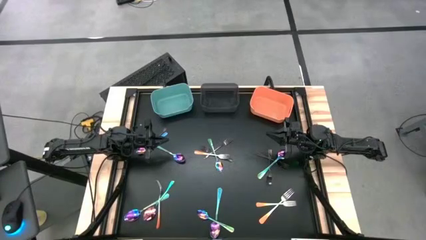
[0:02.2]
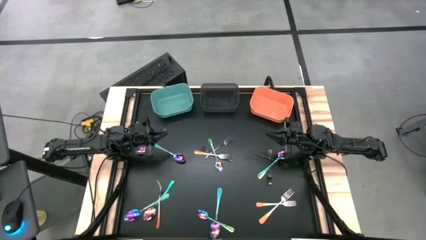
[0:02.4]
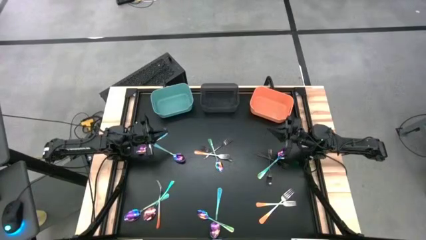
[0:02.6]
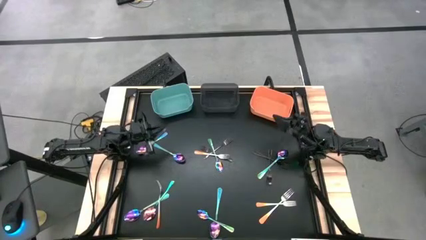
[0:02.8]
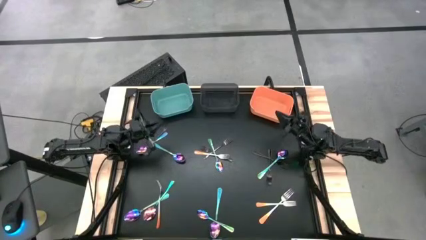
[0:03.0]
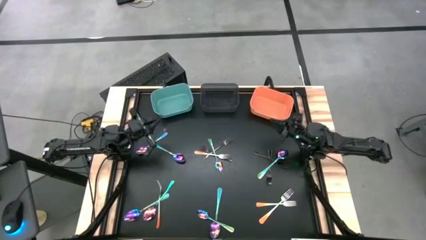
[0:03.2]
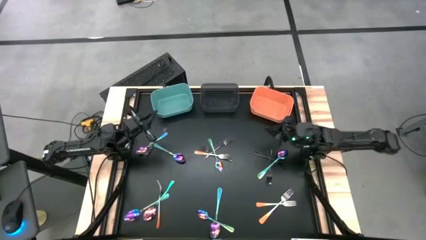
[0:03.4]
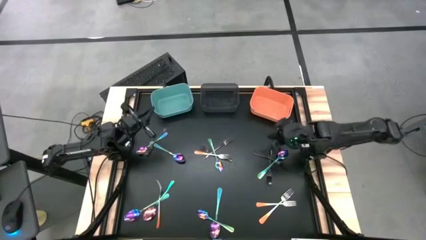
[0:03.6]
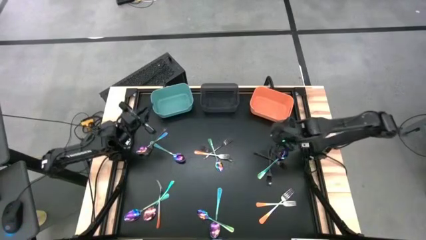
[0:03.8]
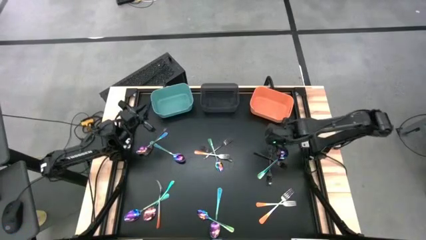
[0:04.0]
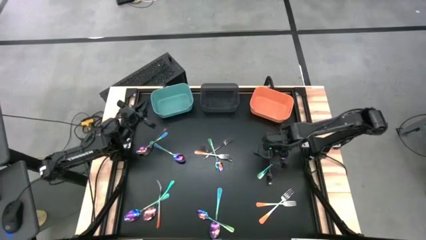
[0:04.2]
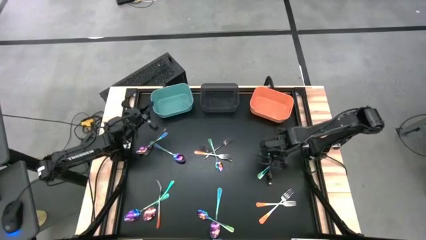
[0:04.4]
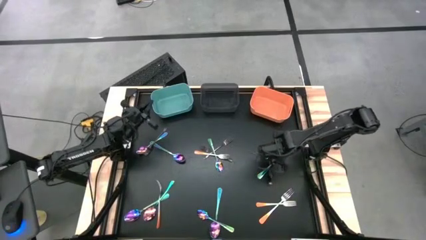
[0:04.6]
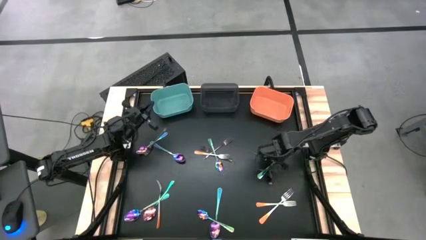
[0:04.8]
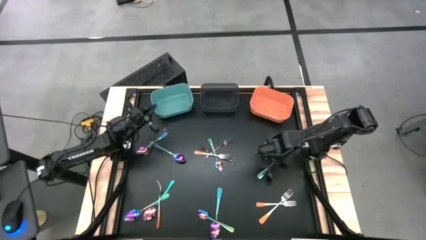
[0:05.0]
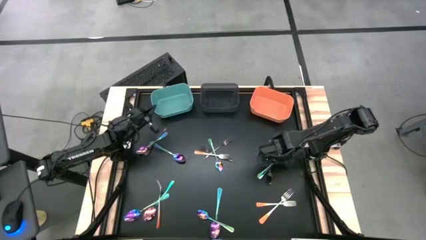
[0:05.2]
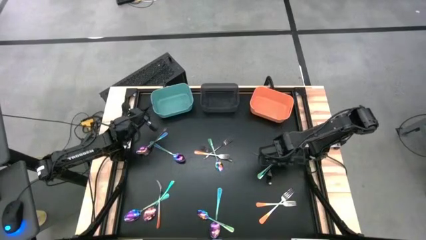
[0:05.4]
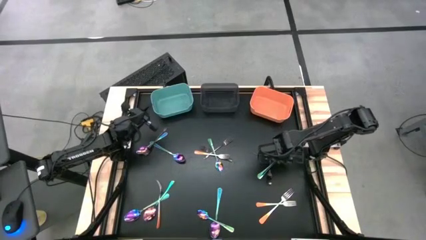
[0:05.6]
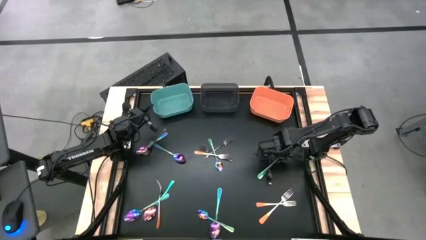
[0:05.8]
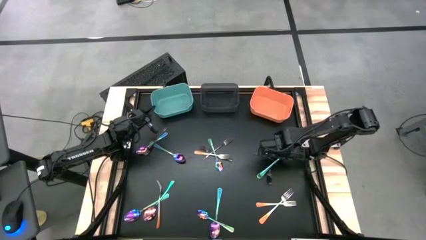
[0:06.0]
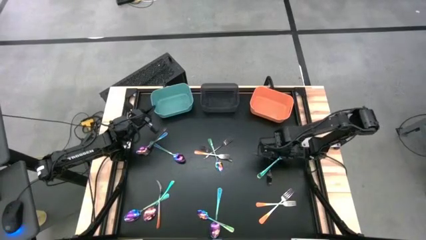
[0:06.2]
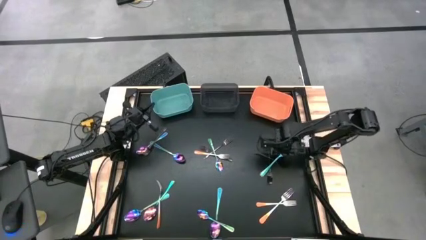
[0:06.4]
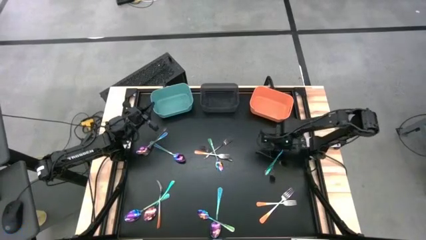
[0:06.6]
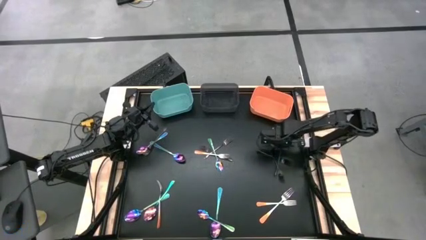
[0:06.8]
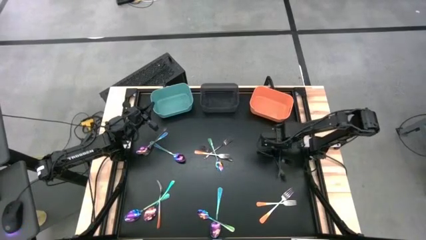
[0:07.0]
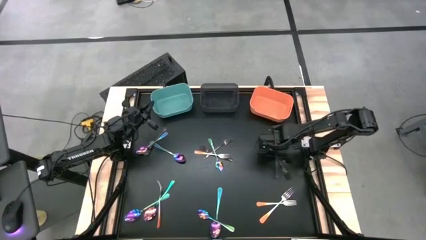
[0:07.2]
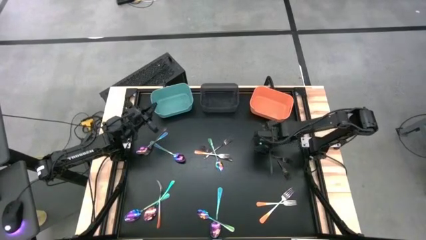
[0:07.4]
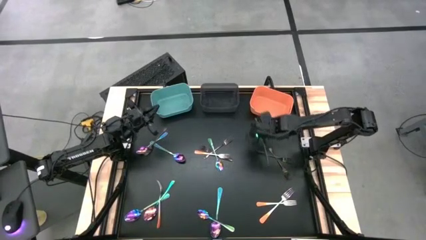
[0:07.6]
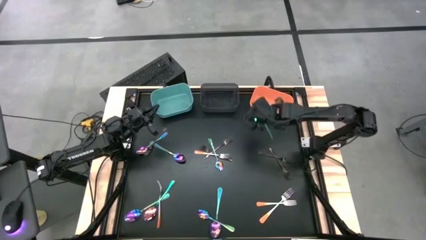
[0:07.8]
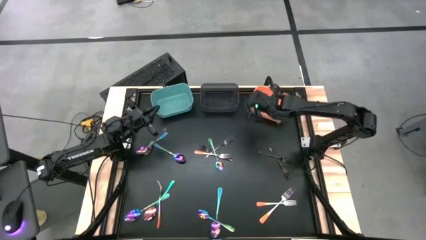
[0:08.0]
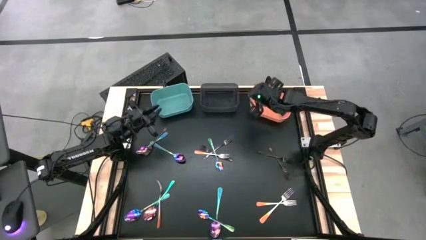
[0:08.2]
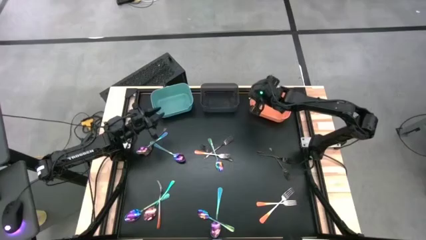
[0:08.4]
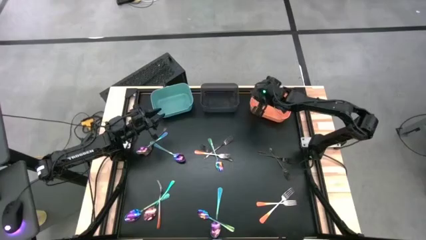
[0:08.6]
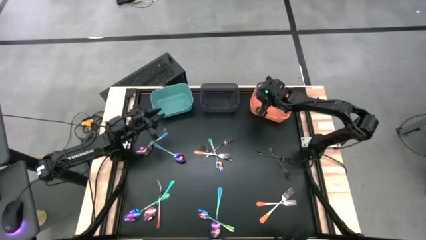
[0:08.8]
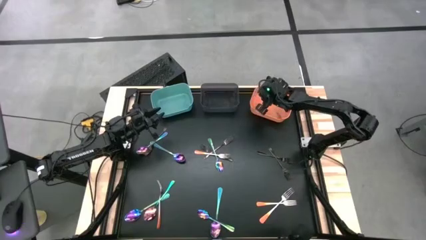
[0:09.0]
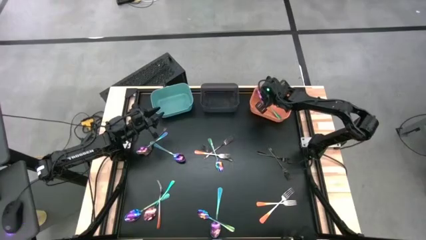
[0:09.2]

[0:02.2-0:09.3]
Task: Sort silverware by color (type)
Put the blue spoon into the orange bin

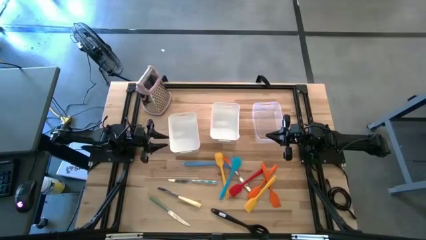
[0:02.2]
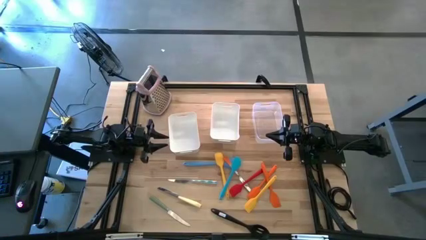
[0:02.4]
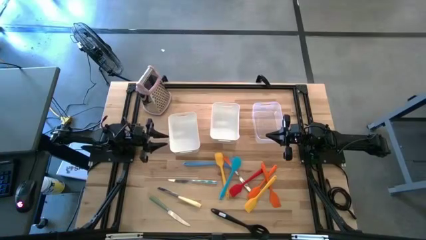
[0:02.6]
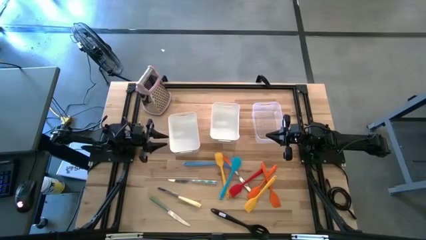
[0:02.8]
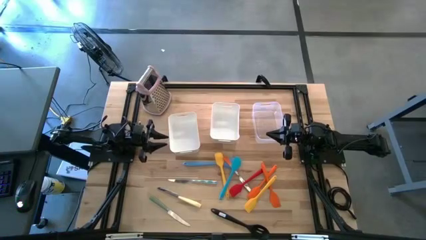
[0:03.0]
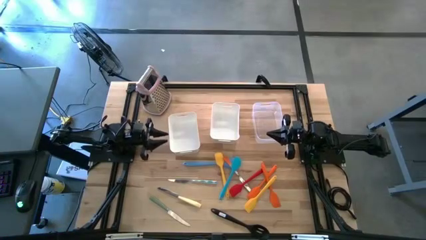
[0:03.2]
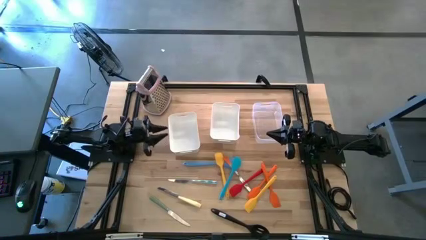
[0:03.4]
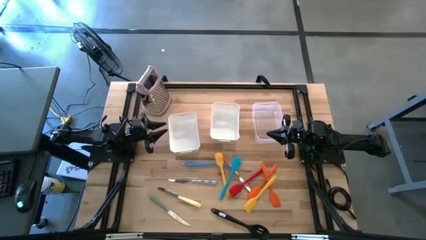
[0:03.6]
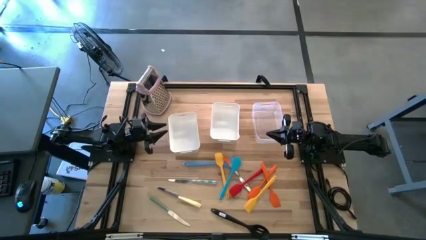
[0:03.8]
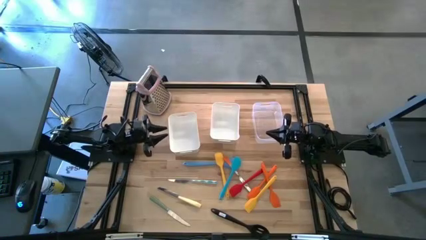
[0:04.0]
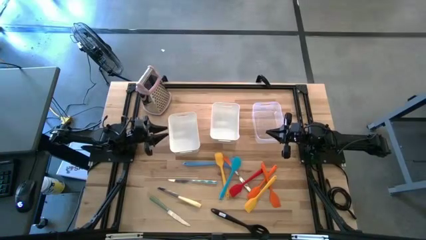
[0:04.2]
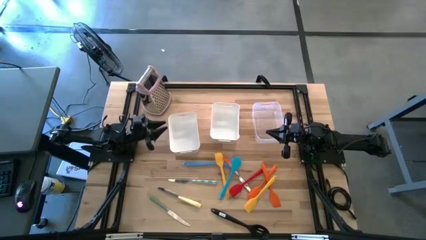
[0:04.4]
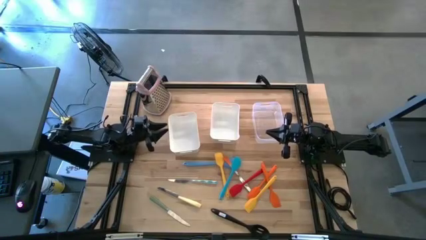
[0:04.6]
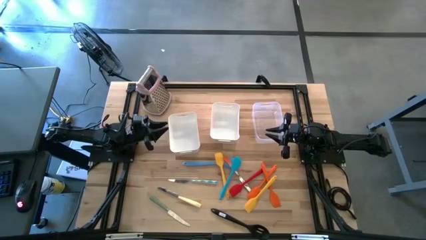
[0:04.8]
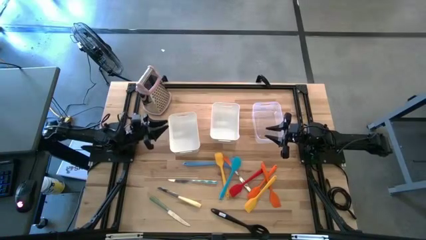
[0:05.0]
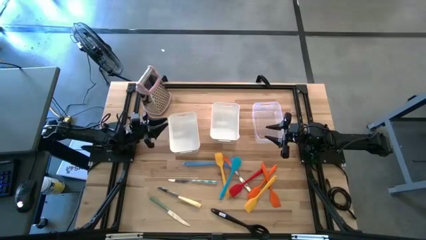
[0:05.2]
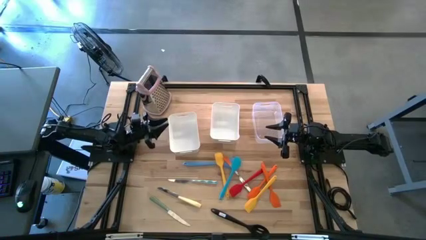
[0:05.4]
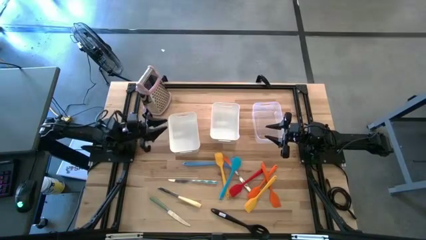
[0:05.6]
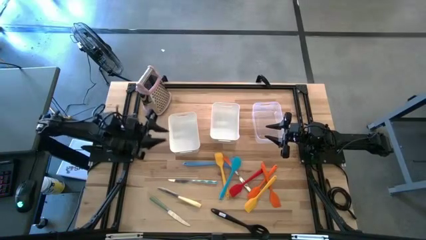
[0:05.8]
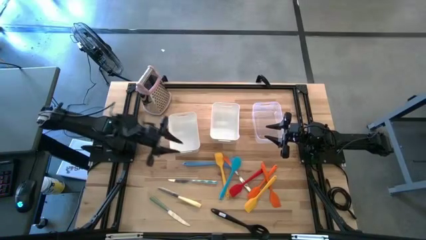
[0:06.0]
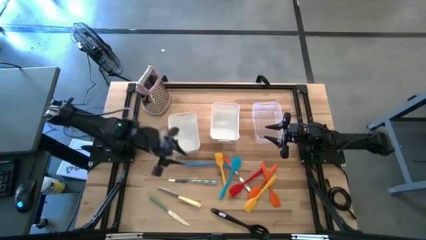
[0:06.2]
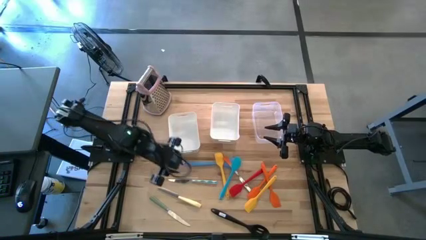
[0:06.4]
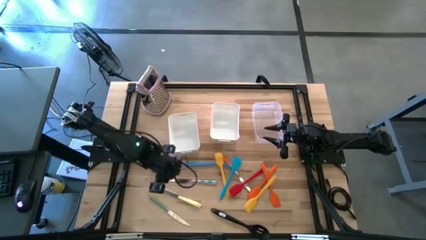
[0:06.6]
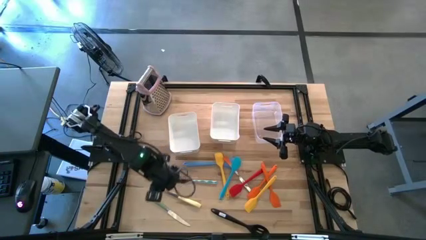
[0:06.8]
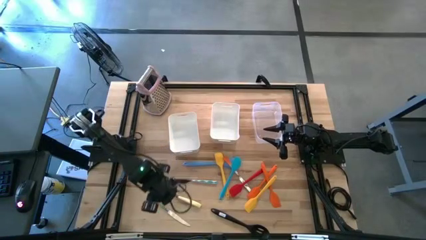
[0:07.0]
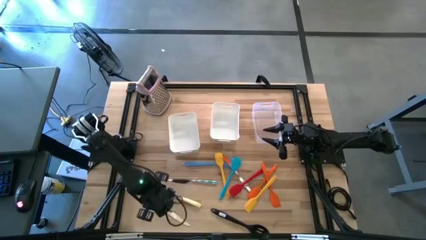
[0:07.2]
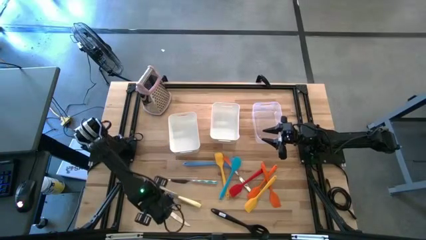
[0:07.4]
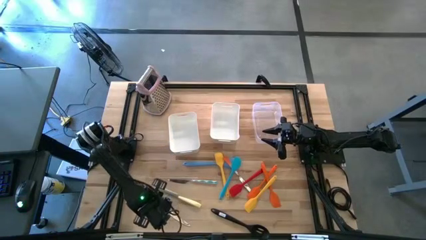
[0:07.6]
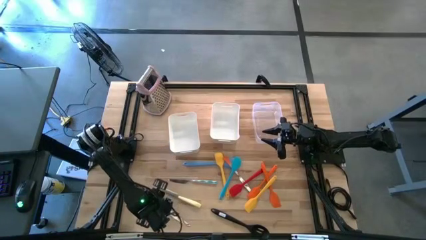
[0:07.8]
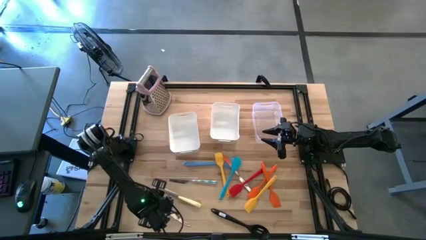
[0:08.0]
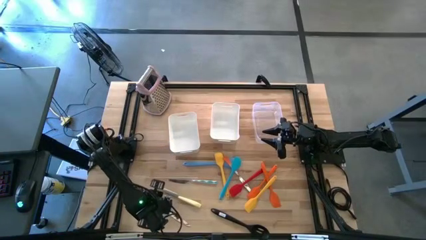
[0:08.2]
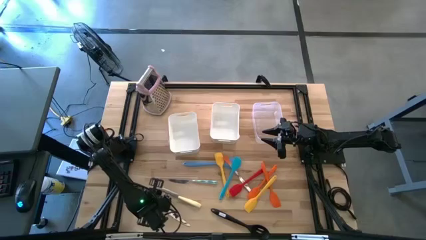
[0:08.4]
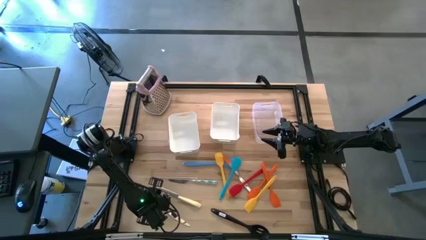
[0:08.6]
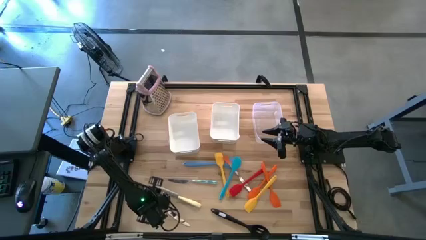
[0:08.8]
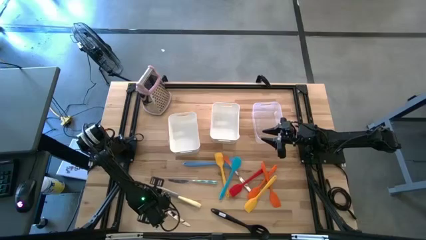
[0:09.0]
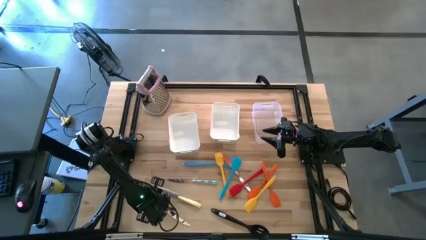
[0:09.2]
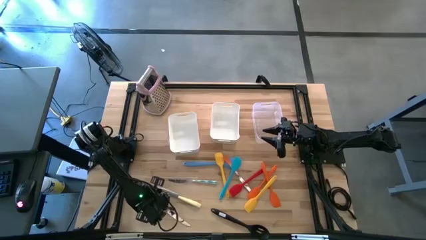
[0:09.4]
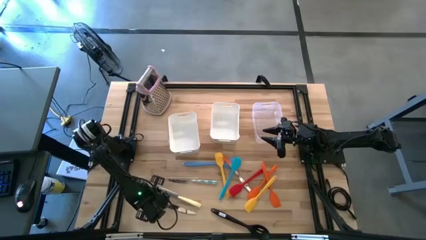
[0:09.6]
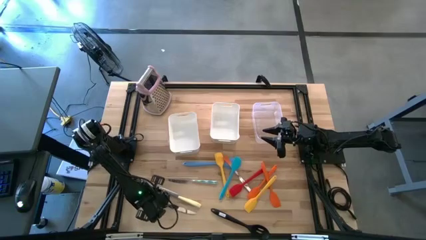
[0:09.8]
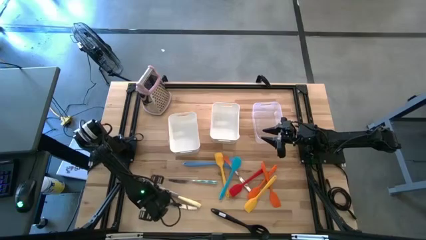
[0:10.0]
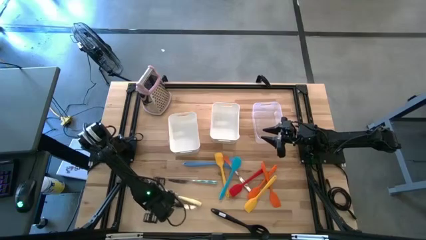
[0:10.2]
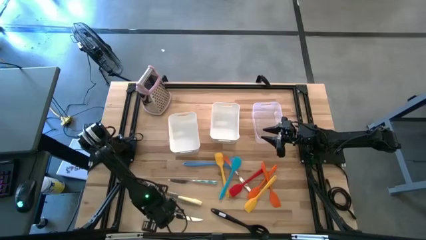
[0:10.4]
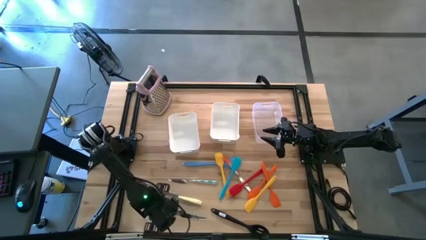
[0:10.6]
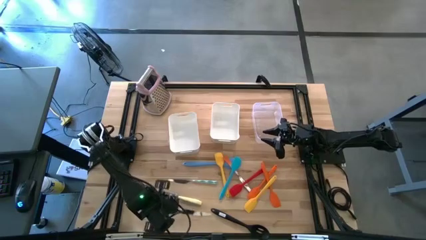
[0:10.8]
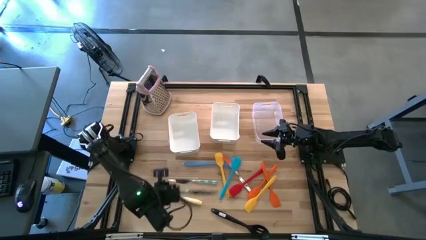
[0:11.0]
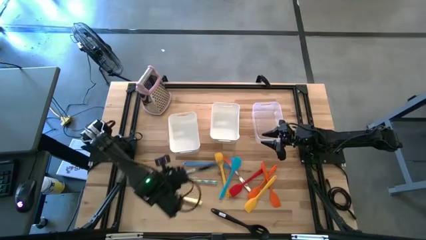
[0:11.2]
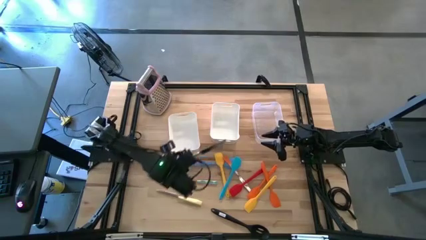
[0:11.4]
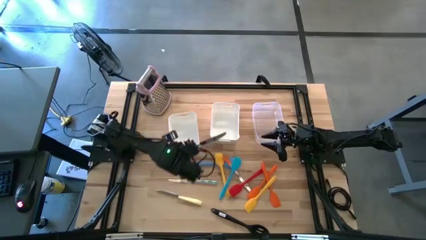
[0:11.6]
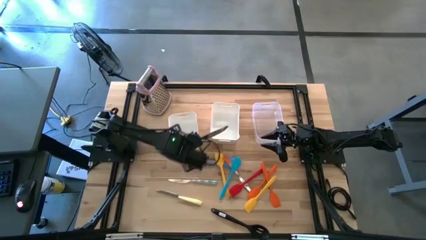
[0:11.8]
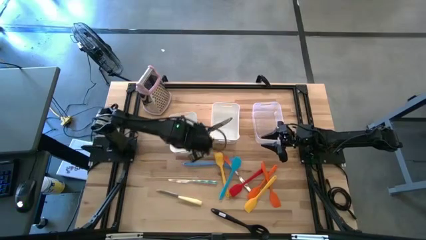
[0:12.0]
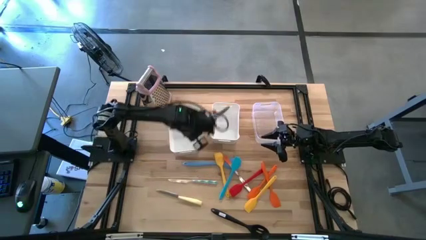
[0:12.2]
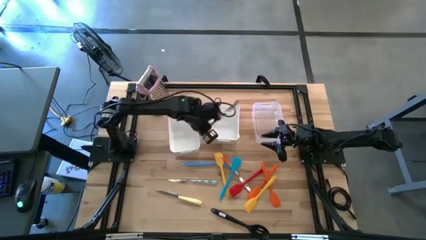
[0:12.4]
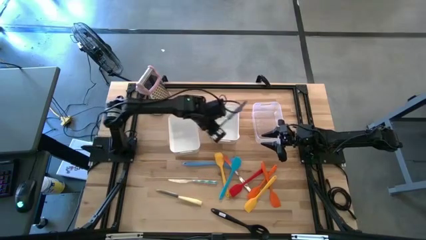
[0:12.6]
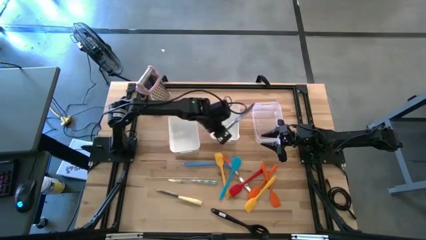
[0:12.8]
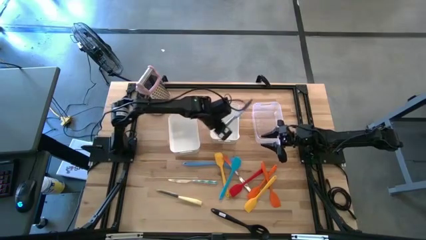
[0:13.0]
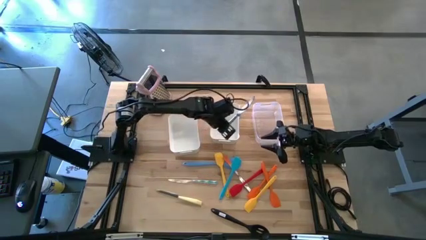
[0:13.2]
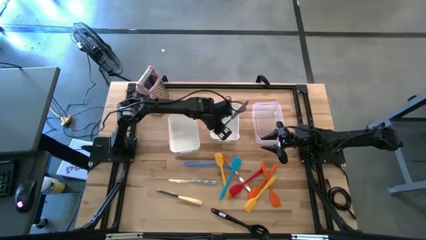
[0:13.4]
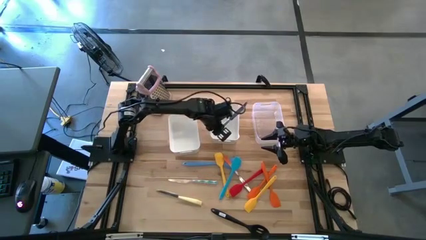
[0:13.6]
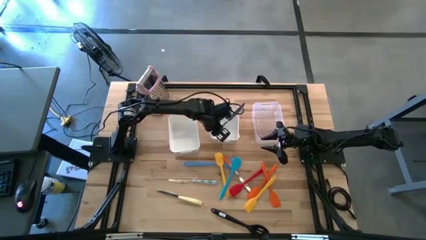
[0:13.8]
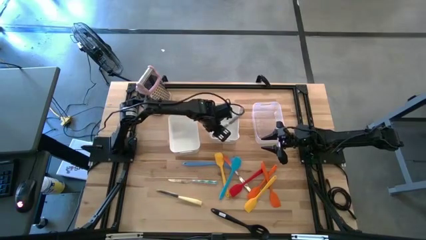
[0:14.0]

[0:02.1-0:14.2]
Task: Pick & Place Kitchen Items
Put the green table knife into the right white bin
